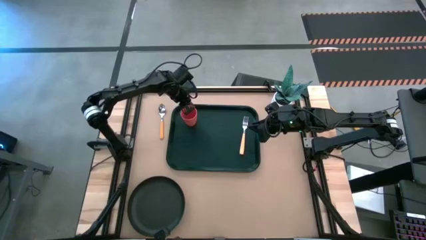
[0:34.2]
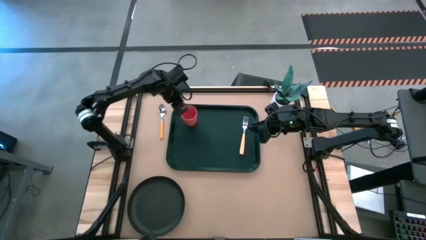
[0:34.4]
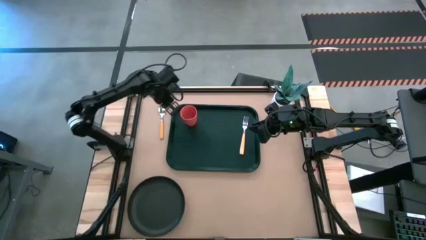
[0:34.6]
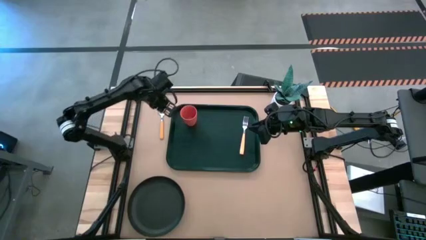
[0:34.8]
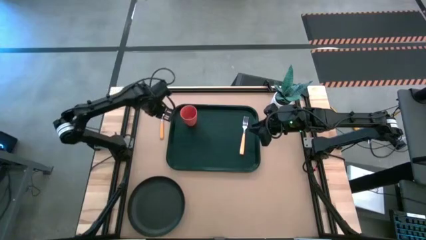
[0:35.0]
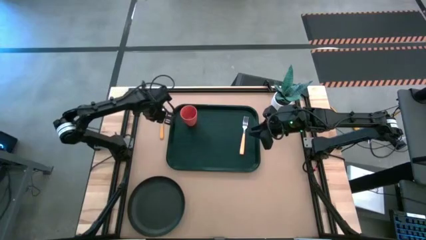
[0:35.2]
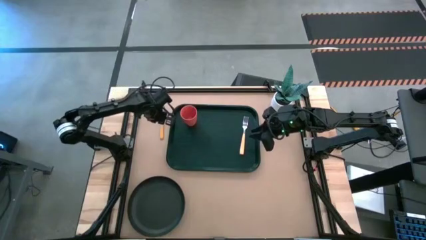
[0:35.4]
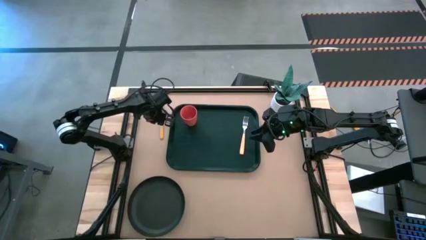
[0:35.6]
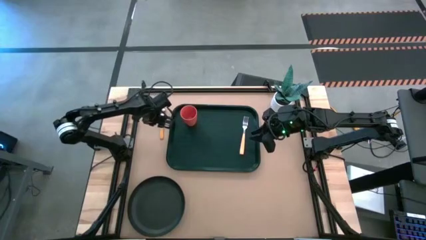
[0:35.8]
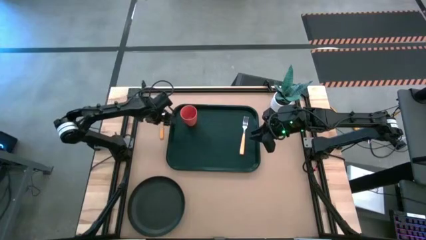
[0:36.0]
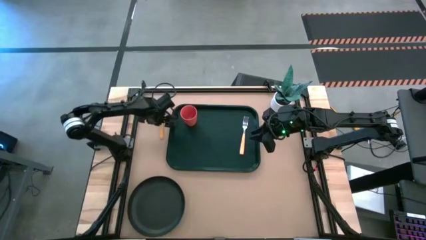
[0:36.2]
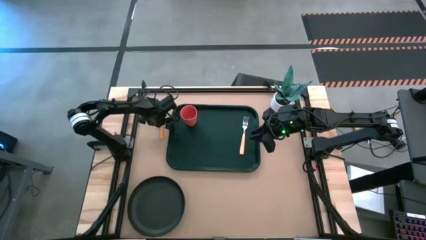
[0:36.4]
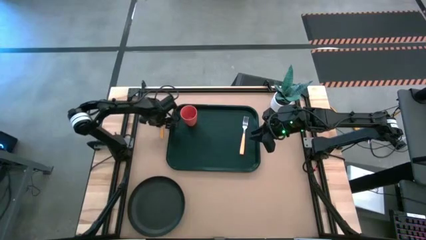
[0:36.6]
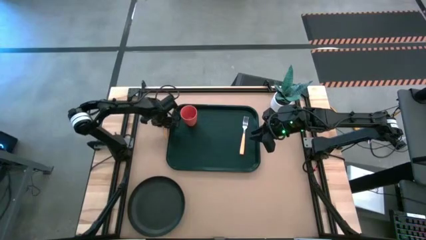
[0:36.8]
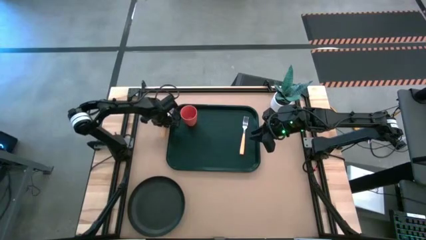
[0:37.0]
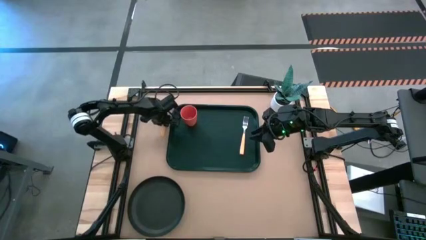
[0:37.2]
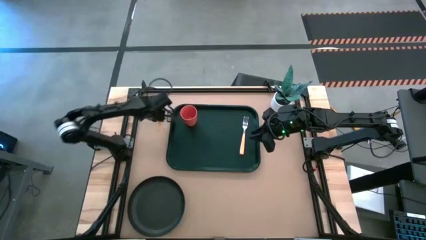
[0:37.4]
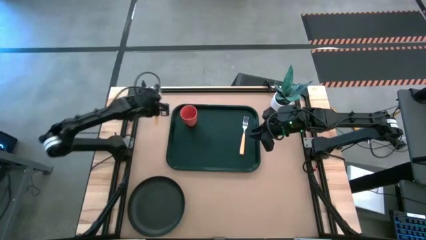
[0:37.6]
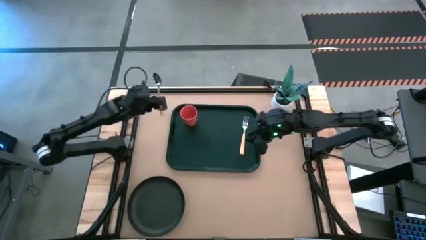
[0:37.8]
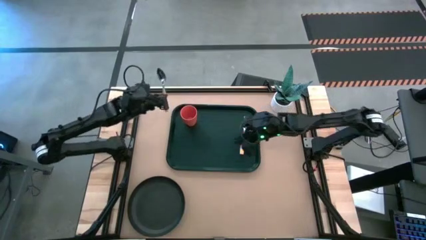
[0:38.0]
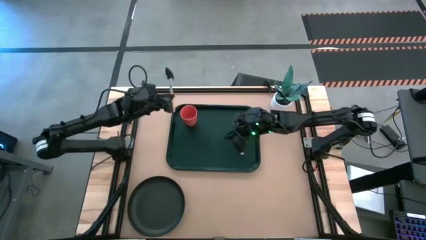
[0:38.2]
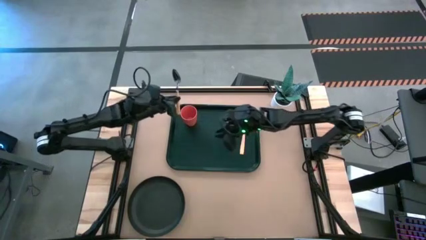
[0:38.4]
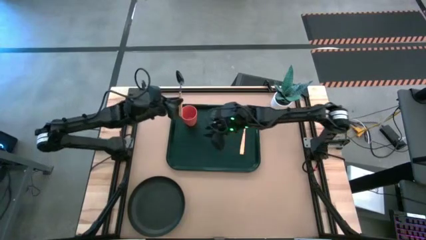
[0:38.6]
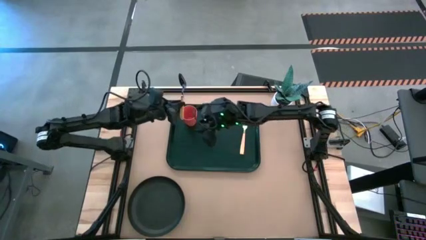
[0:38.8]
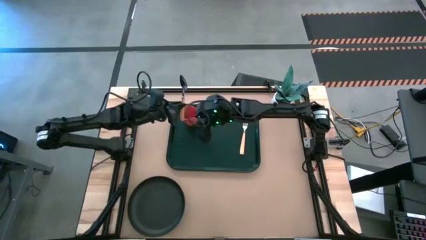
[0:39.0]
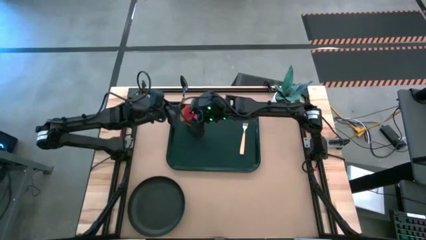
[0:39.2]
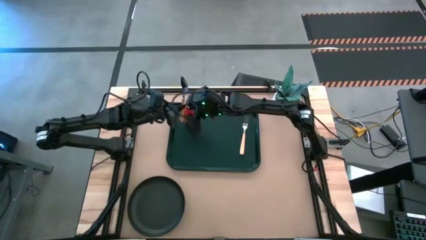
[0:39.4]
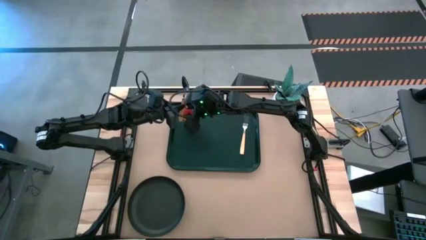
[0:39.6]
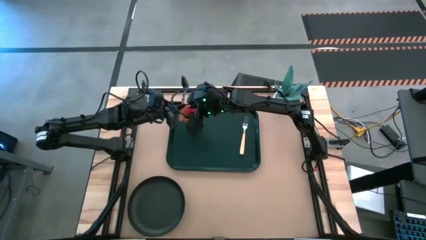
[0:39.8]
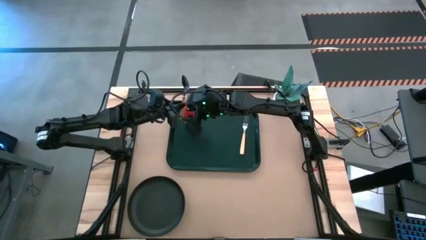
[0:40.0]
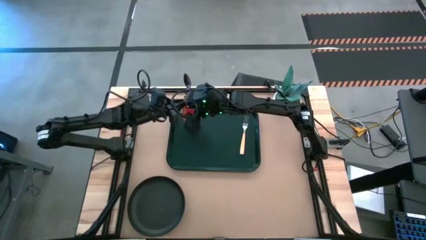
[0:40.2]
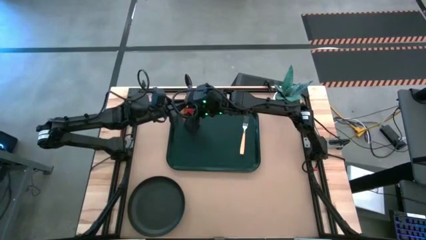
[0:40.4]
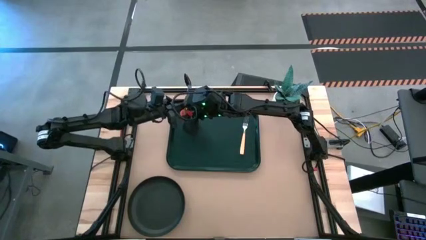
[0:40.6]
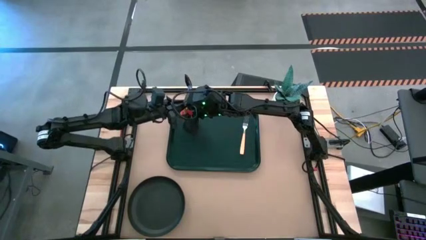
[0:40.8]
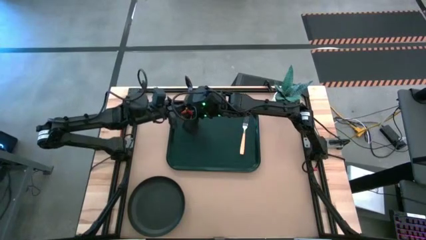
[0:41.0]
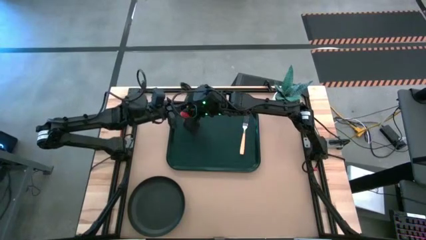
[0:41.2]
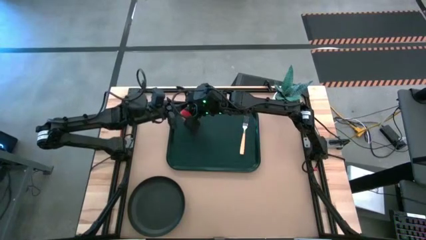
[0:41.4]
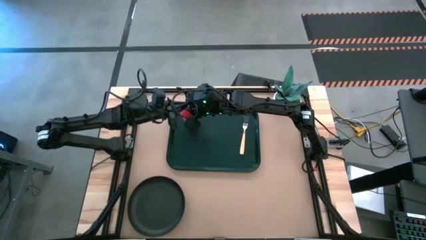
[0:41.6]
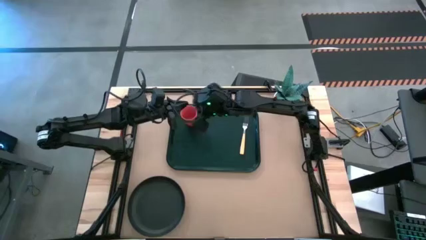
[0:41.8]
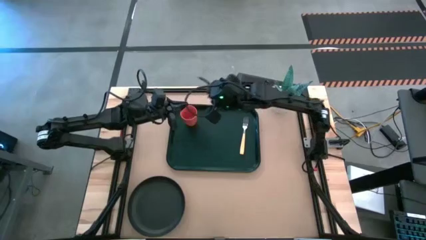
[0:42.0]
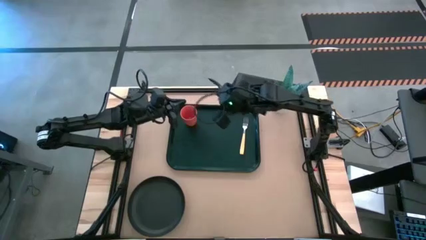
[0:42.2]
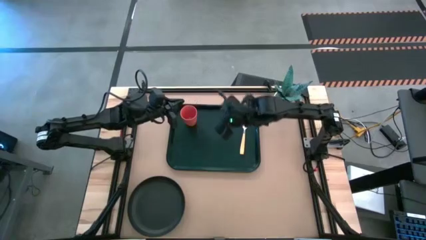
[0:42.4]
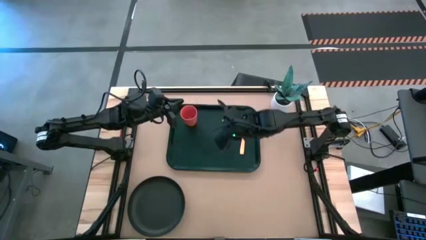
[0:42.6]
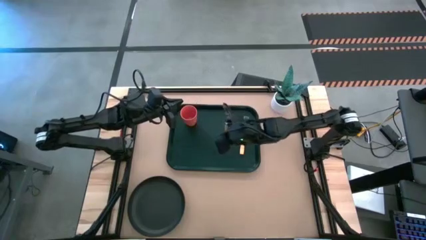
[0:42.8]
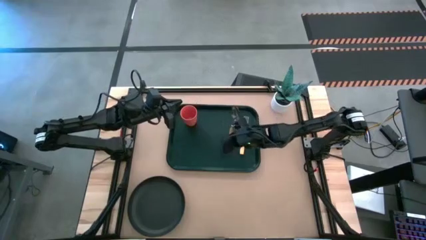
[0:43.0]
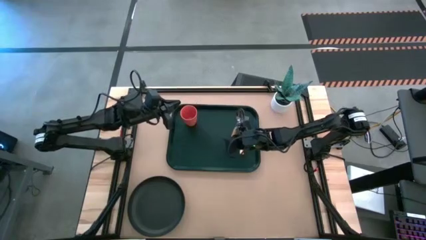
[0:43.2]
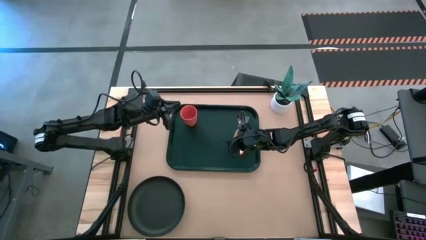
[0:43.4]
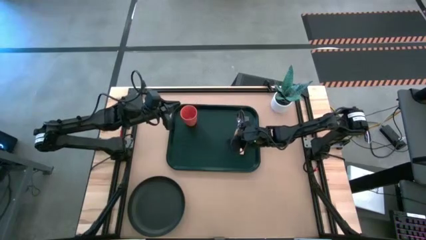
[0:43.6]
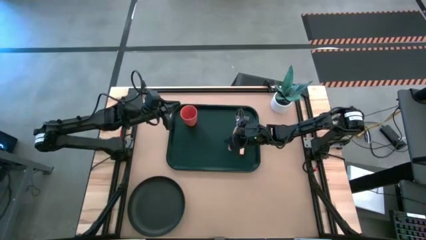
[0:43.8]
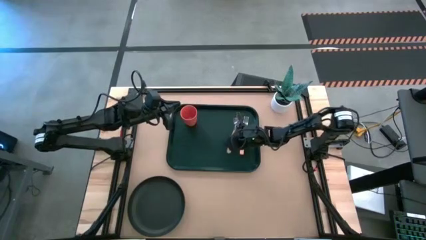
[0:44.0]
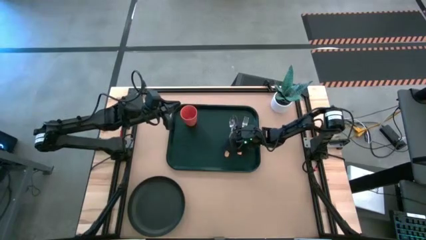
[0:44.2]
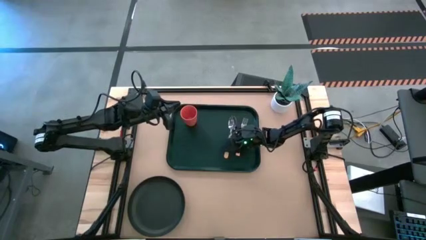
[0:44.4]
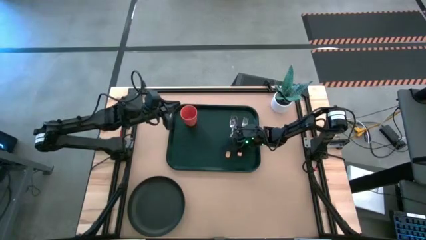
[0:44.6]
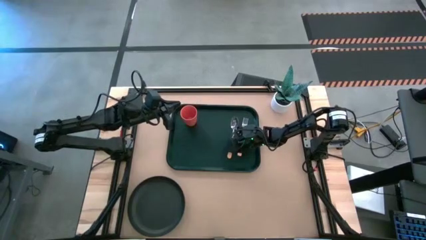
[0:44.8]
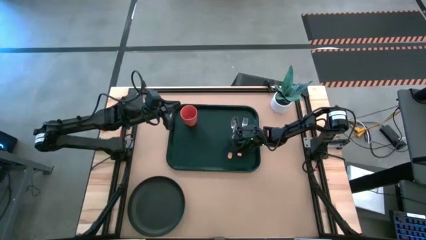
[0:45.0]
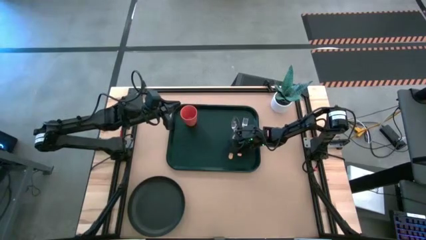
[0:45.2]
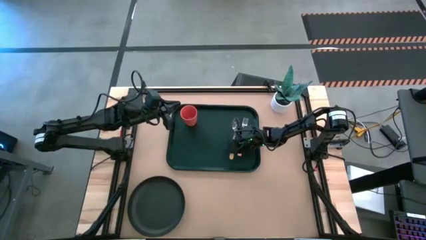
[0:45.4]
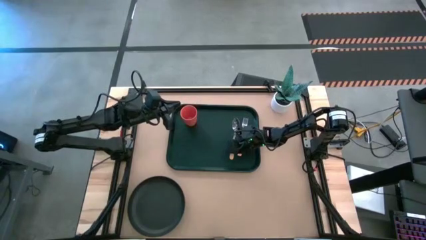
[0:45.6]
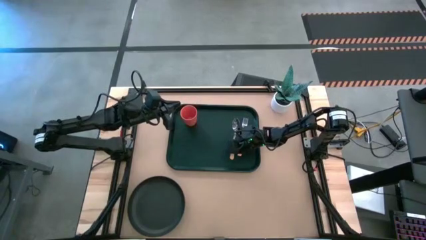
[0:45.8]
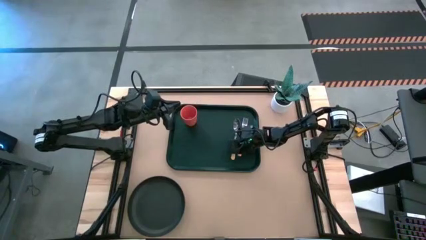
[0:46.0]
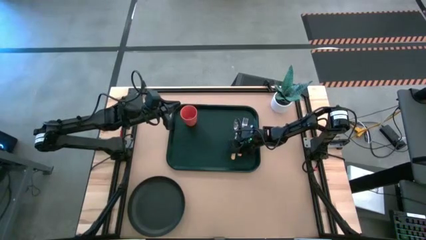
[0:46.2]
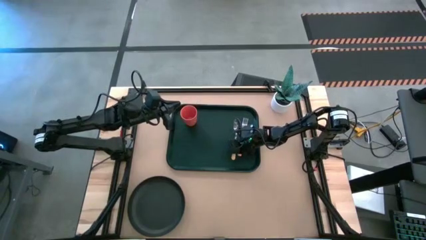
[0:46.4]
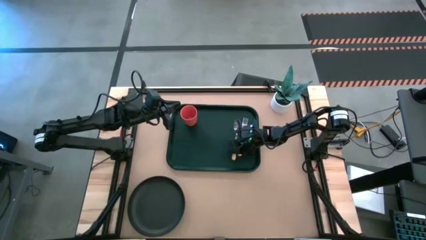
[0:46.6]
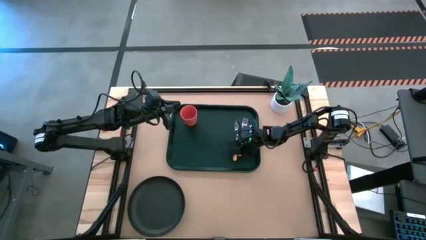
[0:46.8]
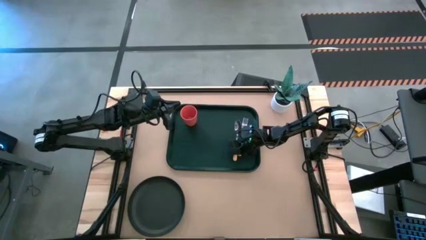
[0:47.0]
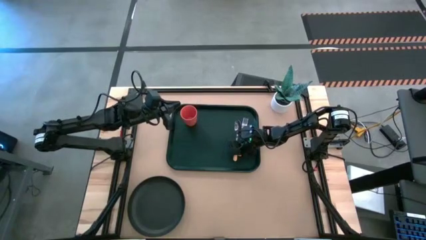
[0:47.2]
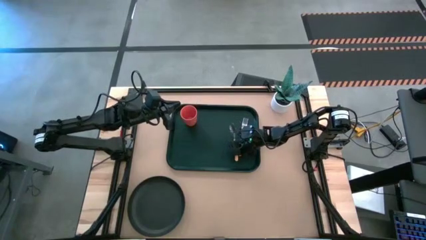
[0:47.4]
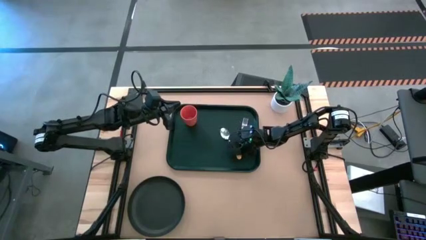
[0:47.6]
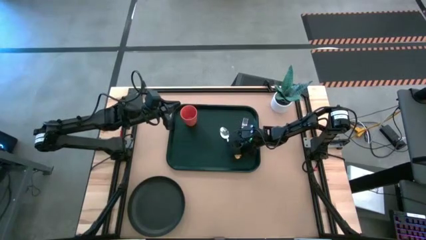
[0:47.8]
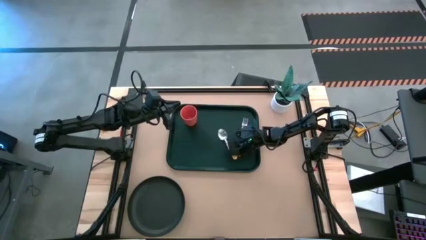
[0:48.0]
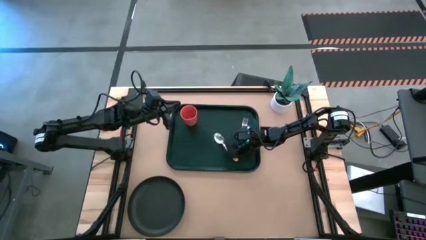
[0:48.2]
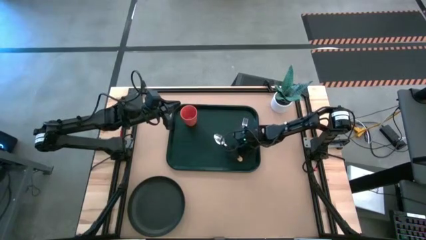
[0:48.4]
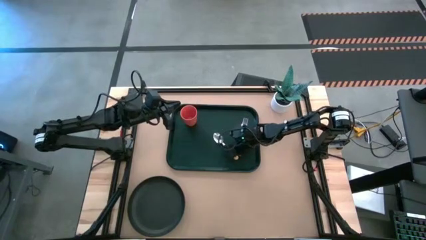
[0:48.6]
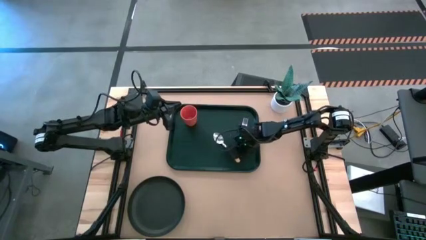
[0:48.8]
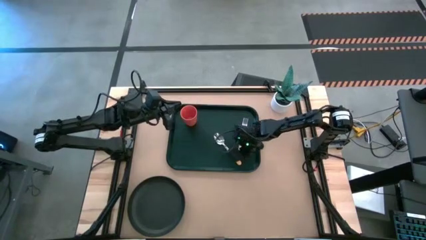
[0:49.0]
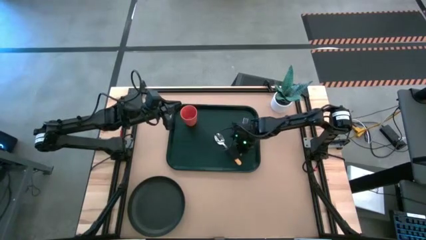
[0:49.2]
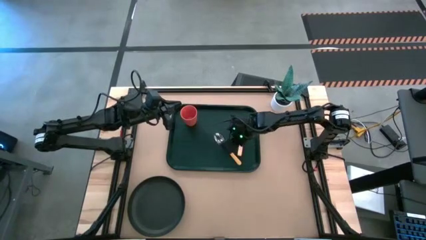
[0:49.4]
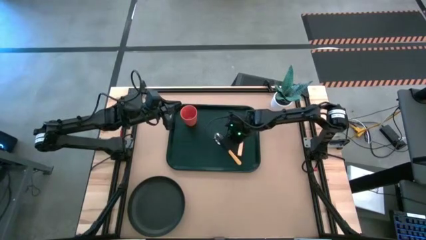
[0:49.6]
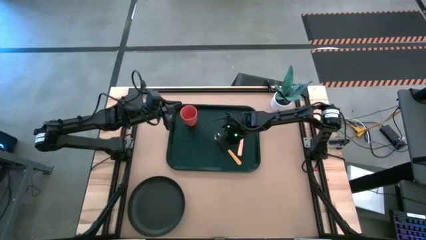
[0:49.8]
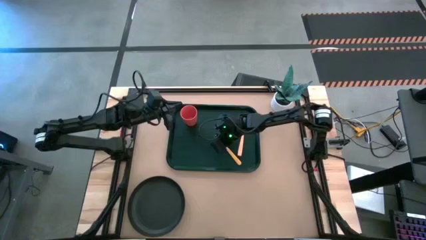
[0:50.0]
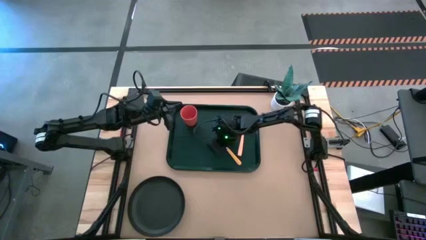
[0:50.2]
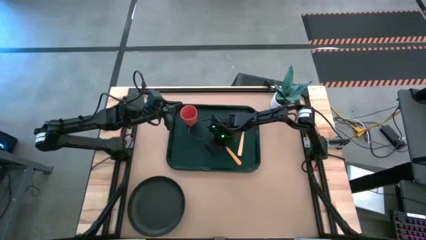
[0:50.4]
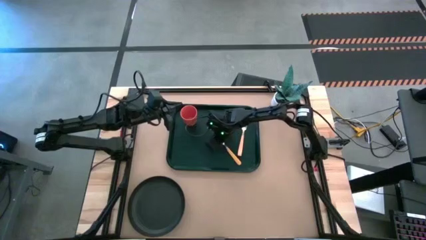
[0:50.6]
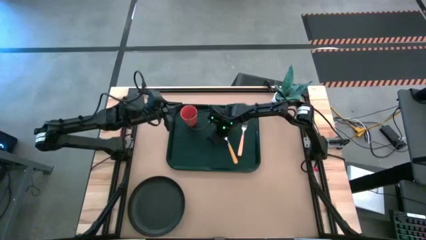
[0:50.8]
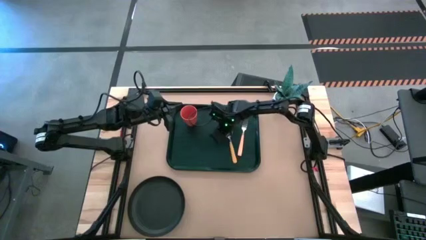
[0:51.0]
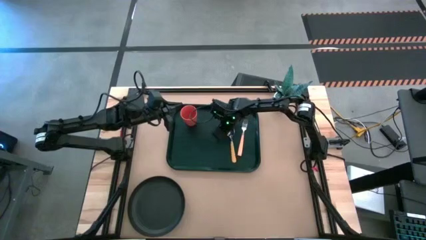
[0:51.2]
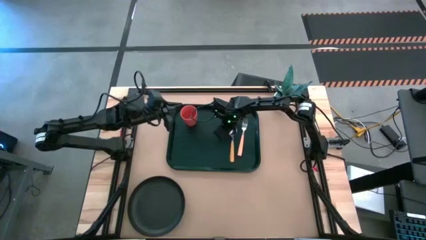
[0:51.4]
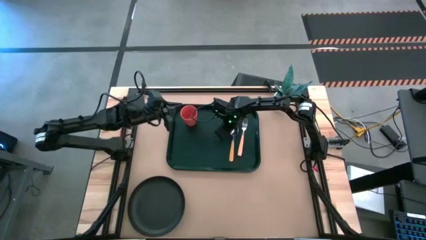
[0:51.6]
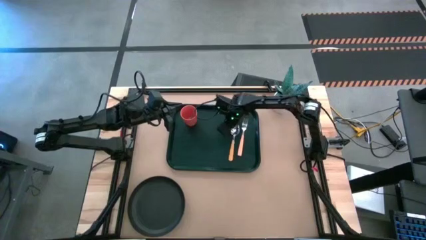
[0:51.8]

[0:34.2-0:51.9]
Task: Pick and place plate/cup/fork/spoon on tray
Put the brown spoon on the black tray
